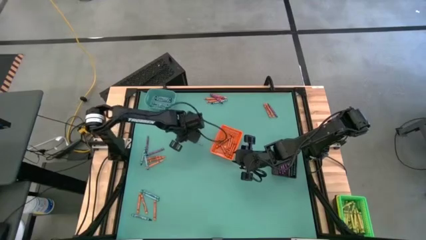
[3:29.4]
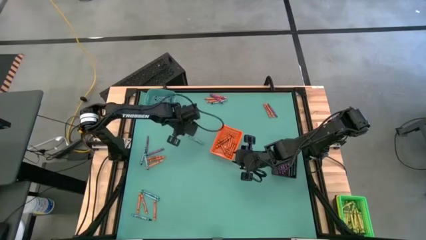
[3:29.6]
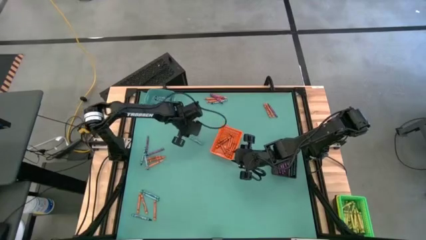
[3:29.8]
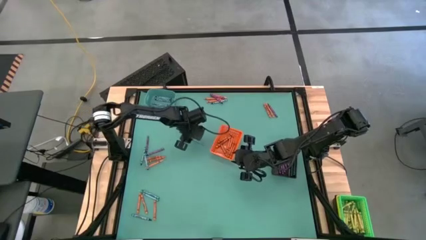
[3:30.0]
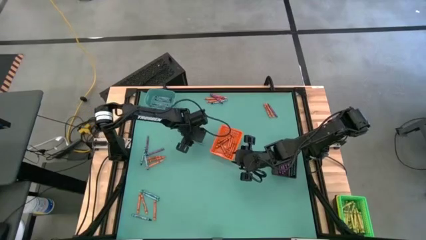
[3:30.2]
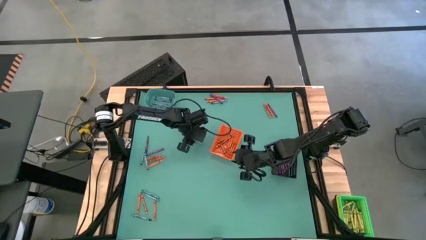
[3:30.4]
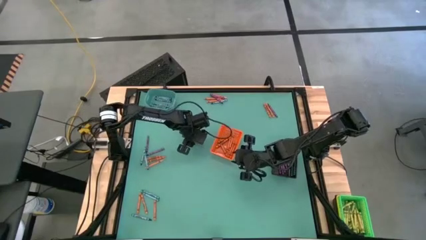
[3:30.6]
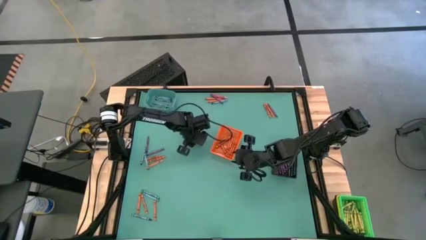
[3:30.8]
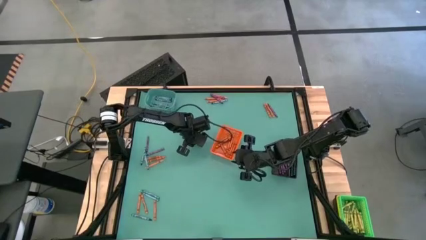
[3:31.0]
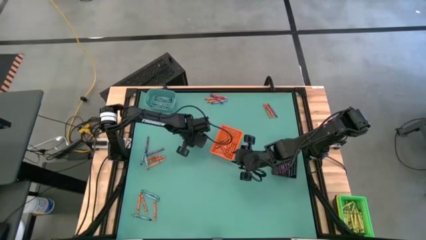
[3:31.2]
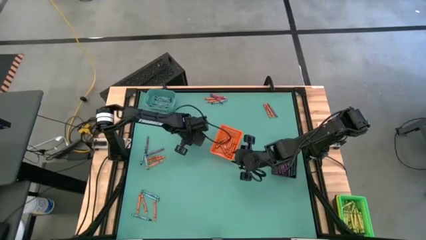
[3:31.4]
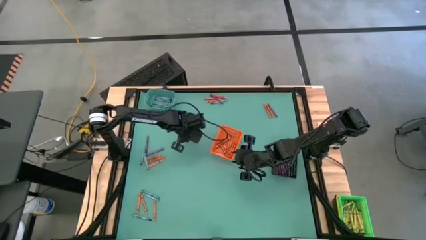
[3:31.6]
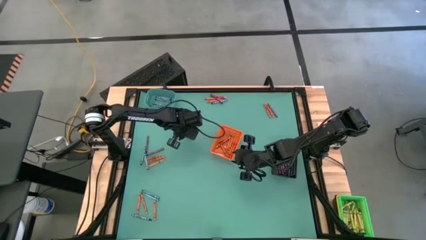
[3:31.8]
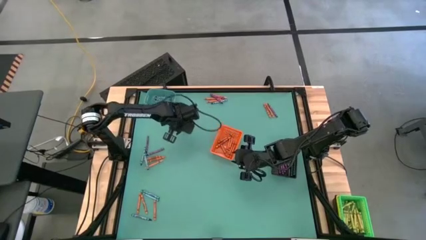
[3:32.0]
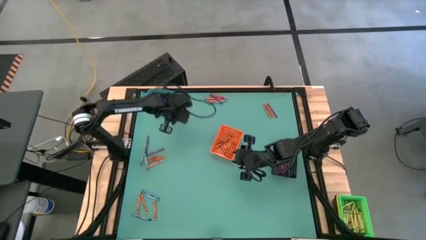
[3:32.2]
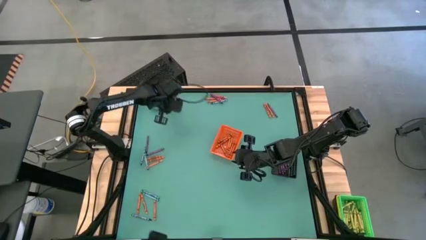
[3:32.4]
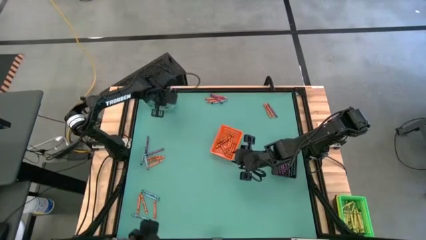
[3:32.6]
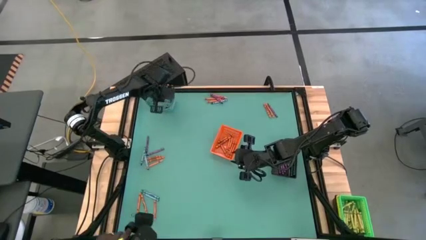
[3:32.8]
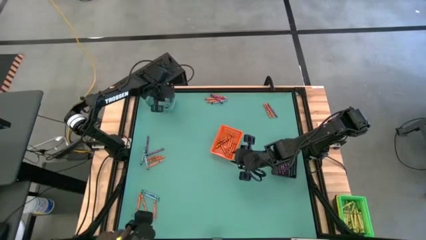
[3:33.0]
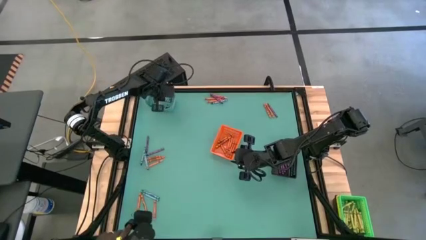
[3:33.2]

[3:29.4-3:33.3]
Task: Sort crayons
Put the blue crayon into the blue bin

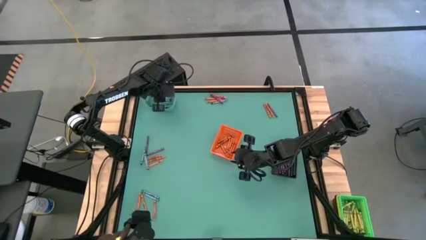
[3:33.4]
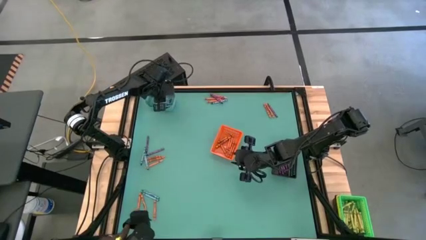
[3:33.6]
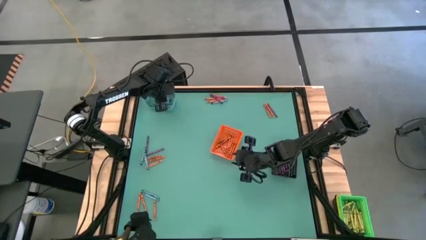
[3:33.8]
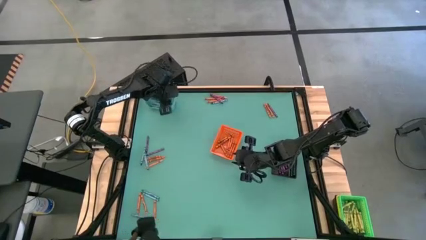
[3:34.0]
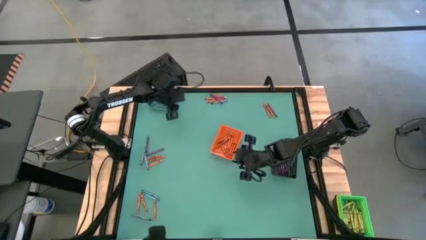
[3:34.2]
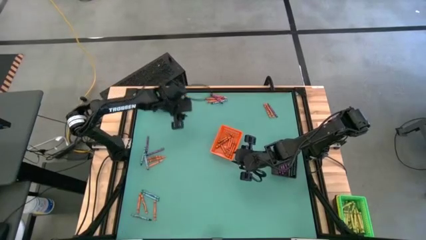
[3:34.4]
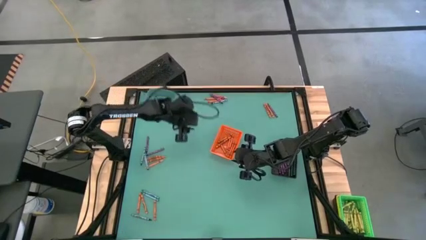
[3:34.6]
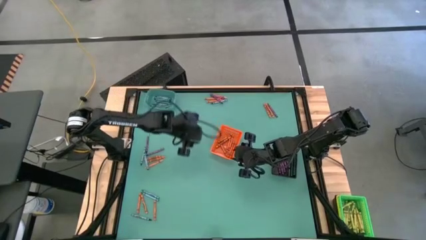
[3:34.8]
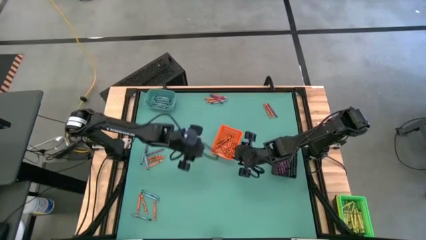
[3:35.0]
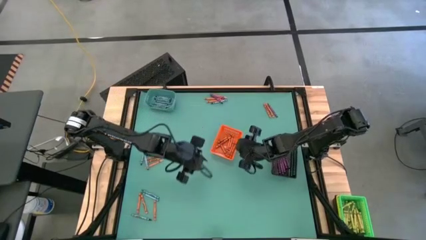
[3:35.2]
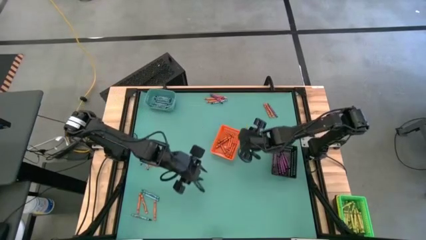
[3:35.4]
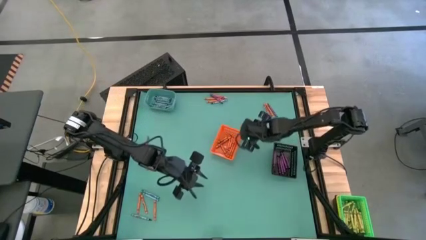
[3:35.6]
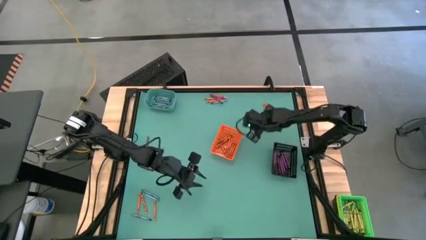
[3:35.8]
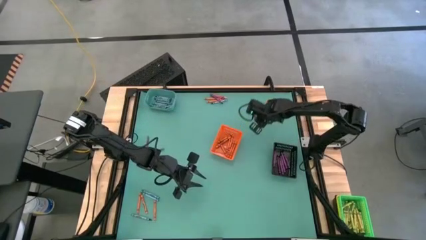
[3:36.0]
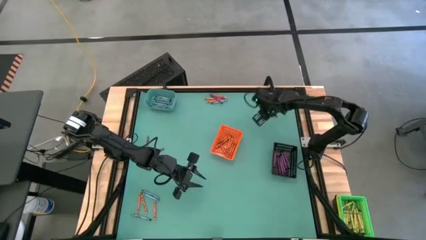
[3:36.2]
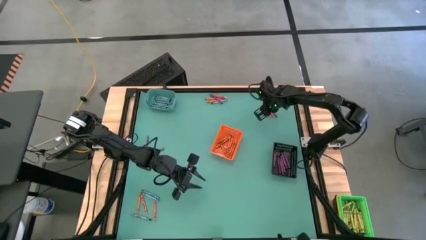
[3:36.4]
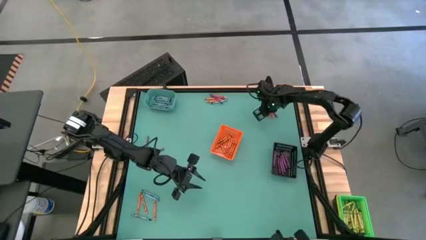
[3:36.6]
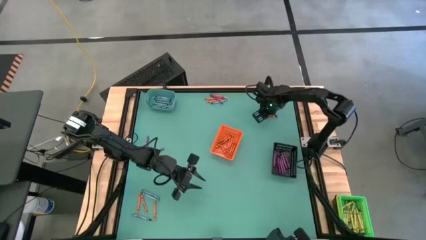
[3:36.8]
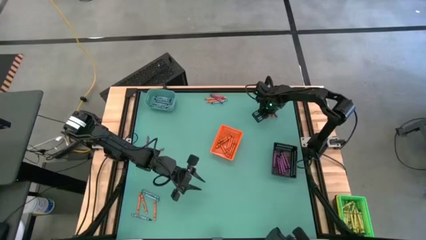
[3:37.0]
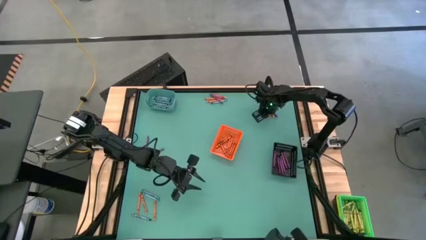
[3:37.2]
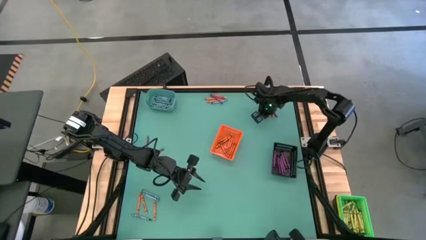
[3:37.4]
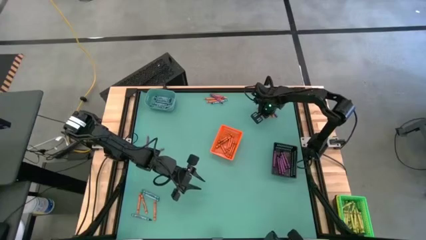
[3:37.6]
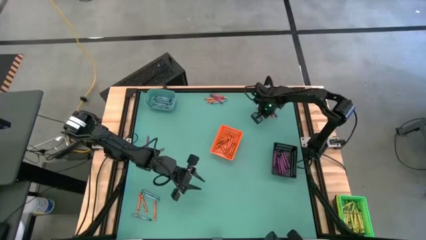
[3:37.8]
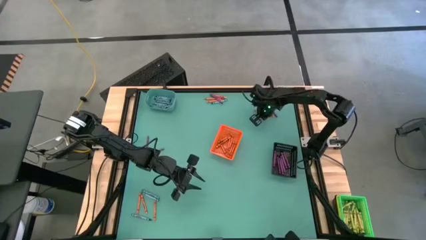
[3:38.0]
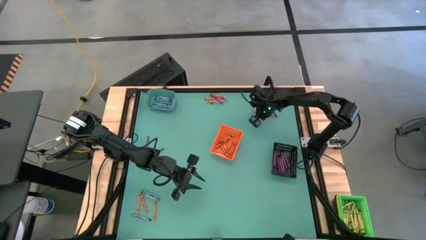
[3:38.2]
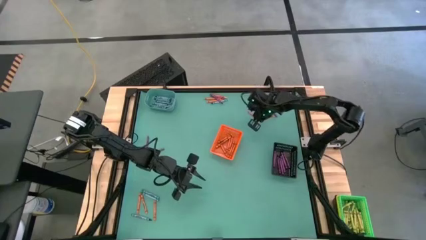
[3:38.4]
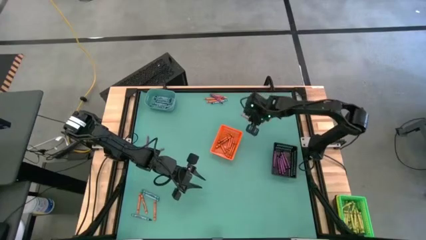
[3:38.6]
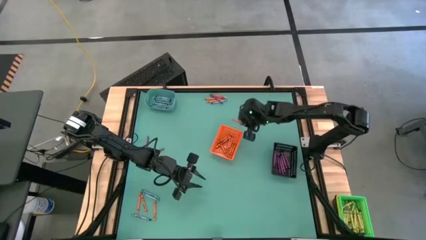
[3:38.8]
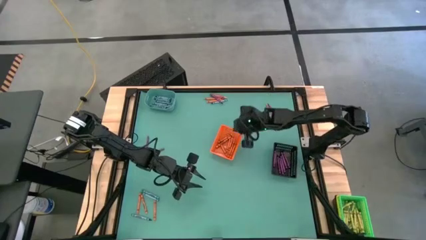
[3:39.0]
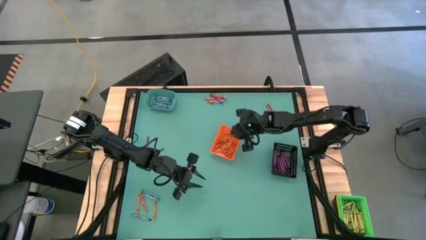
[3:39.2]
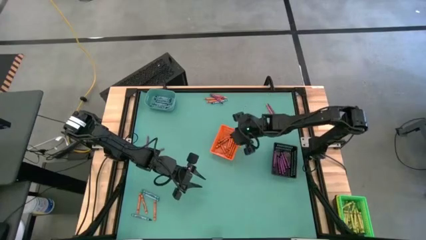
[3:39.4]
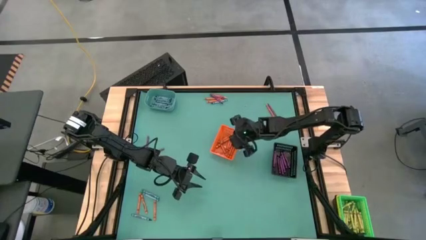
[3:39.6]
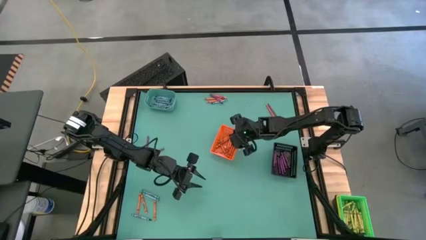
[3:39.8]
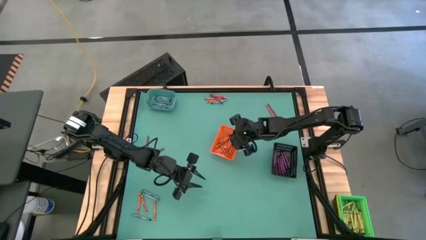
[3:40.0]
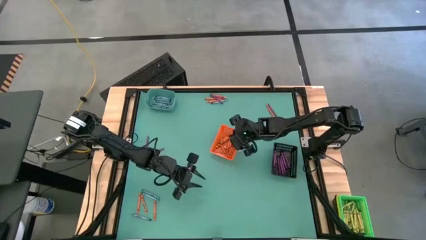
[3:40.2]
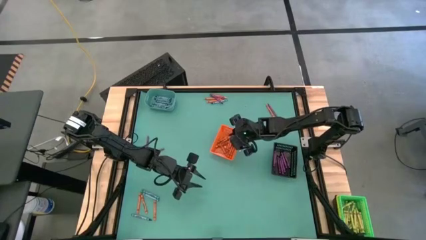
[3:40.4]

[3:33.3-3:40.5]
Put the orange crayon into the orange bin

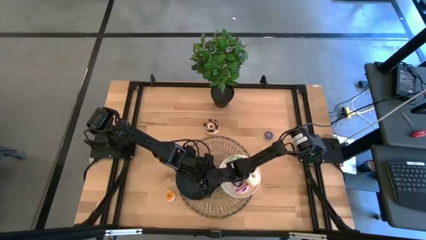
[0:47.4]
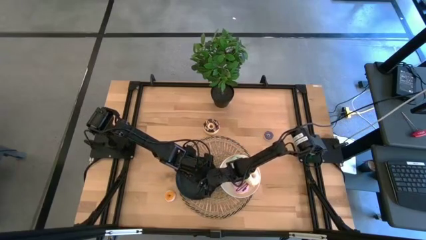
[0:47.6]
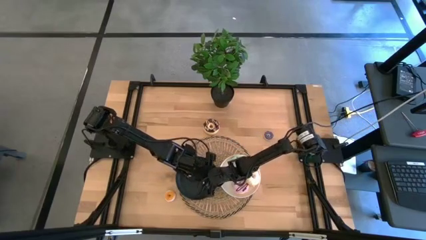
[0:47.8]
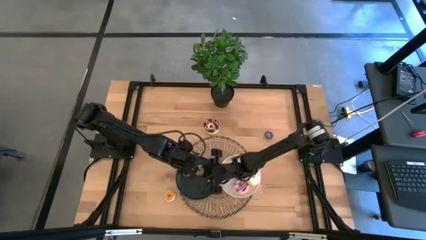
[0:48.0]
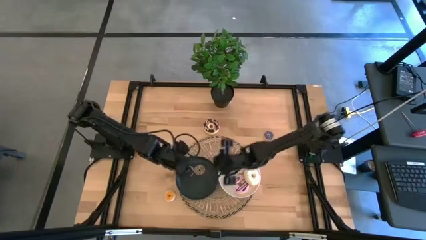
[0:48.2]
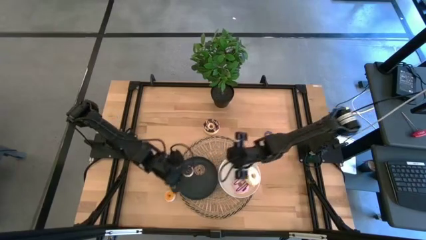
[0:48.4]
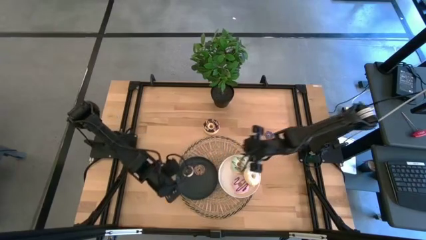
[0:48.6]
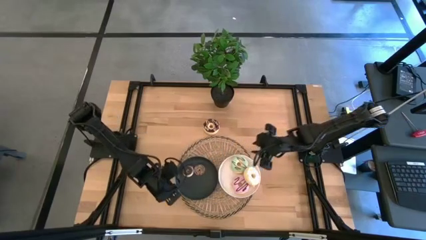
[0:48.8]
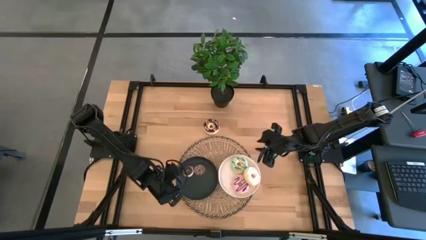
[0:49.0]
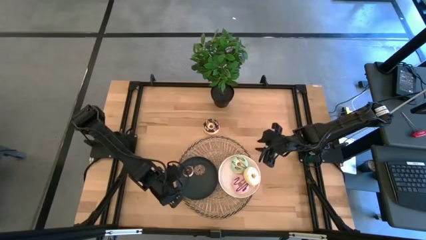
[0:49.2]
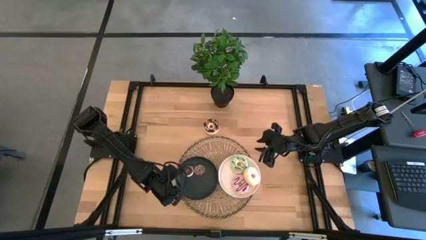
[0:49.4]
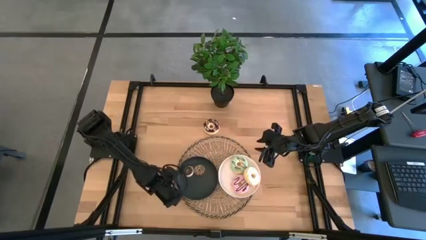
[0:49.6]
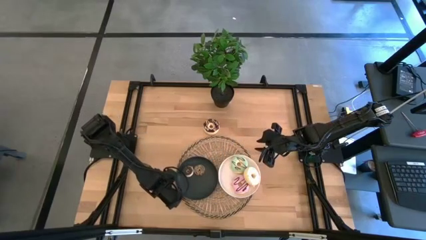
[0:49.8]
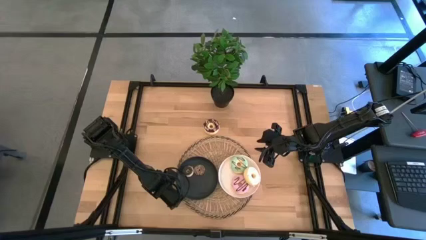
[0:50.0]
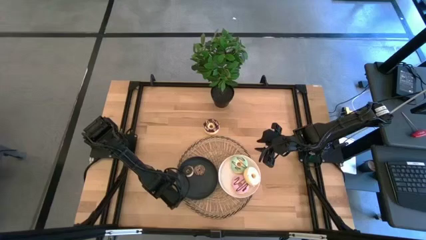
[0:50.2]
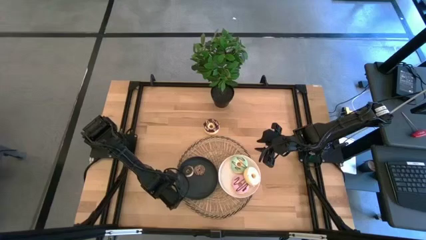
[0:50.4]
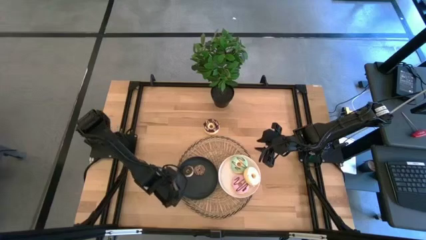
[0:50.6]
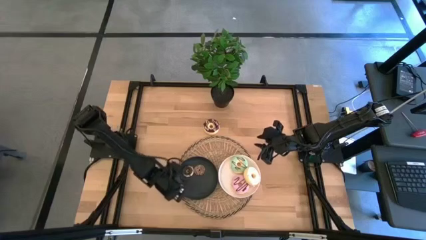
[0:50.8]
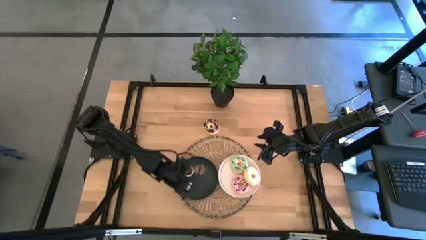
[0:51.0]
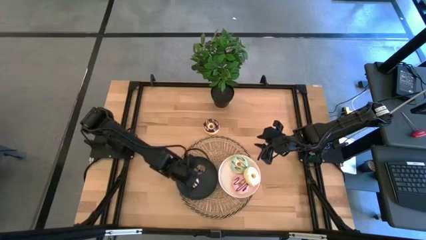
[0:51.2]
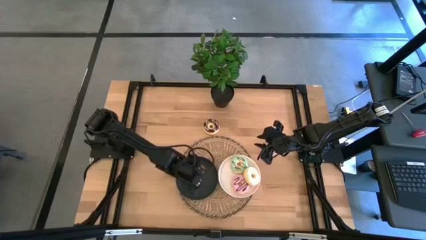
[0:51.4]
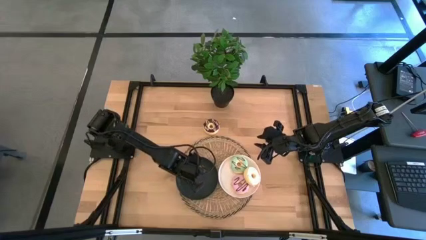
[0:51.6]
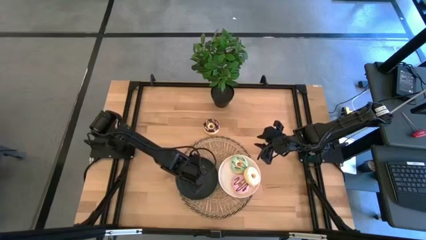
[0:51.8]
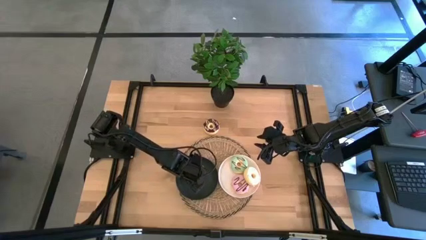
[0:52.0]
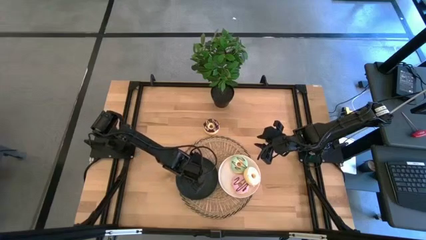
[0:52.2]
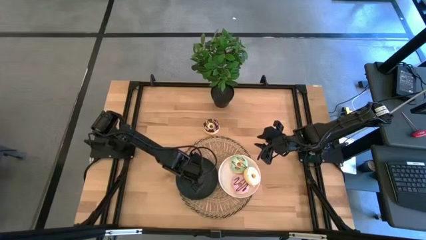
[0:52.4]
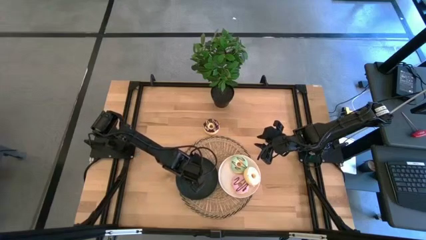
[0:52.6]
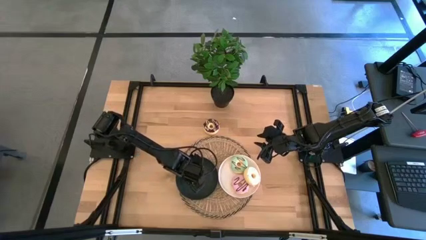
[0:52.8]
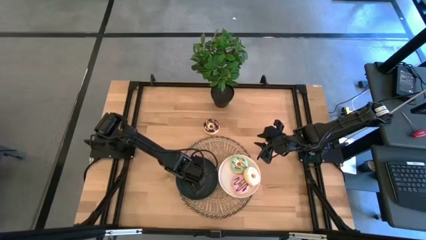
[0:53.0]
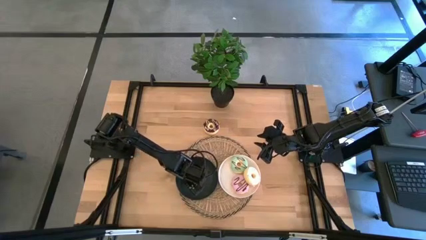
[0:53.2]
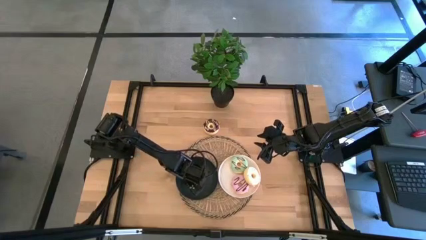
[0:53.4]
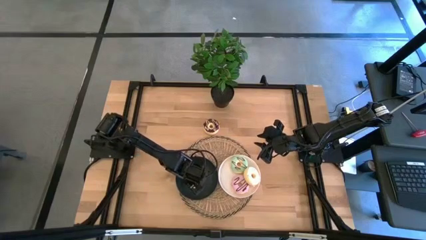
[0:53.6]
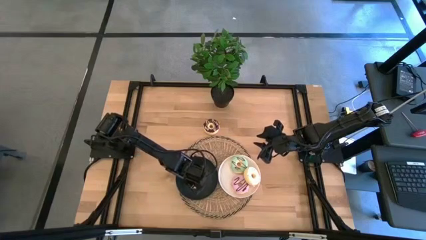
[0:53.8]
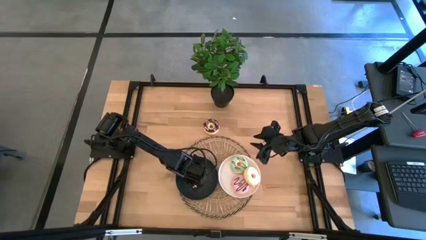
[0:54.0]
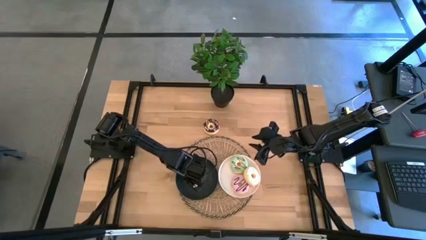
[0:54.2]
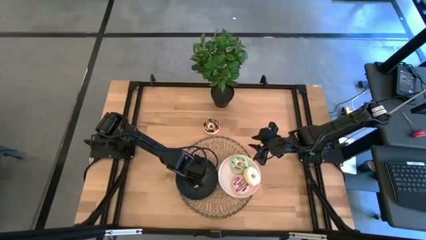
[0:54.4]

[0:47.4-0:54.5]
Task: Pick & Place donuts
Put the small yellow donut on the black plate
